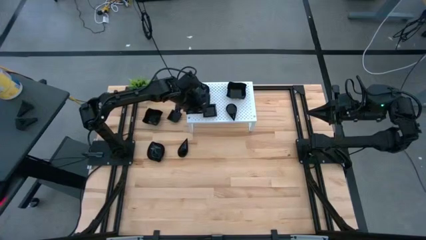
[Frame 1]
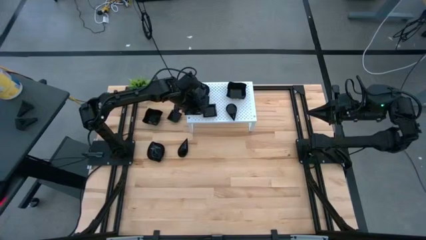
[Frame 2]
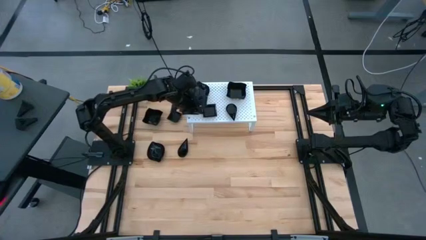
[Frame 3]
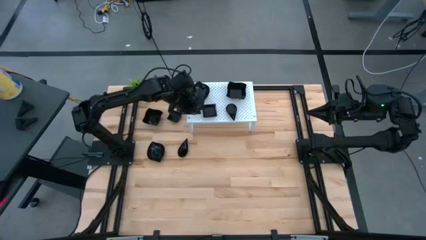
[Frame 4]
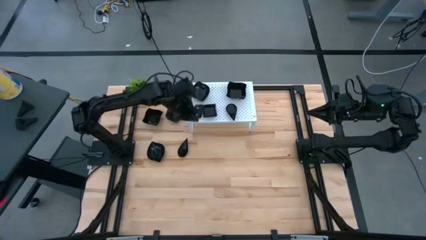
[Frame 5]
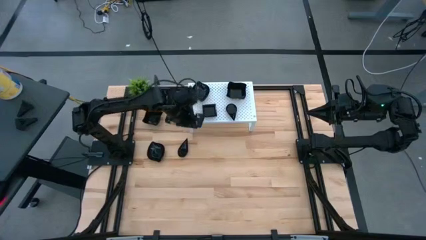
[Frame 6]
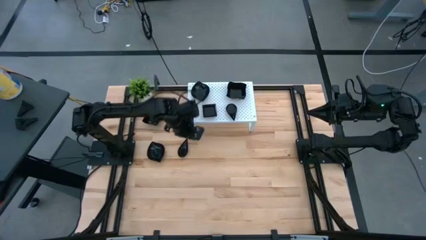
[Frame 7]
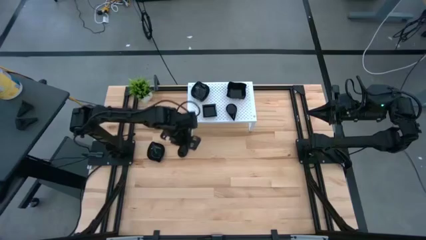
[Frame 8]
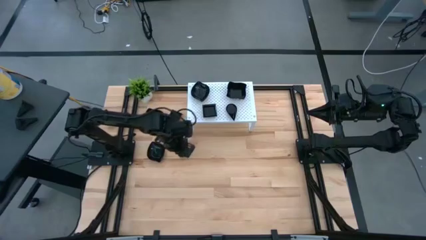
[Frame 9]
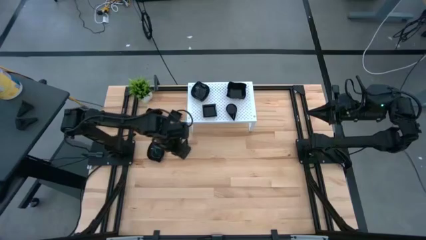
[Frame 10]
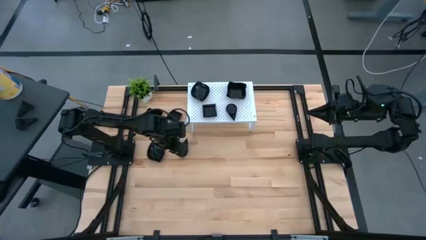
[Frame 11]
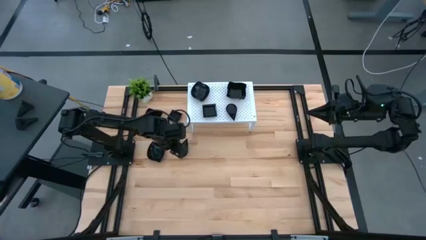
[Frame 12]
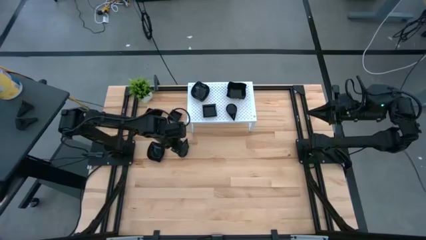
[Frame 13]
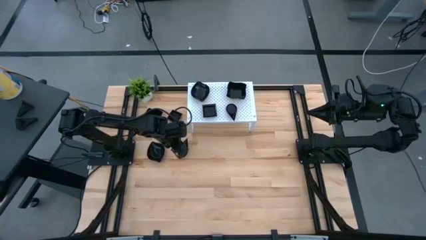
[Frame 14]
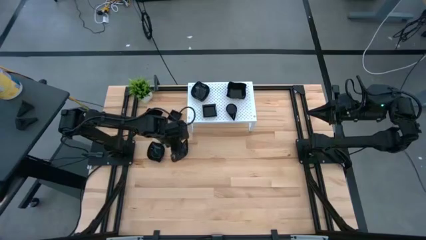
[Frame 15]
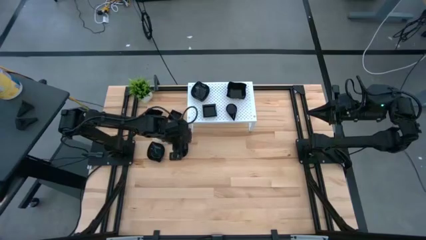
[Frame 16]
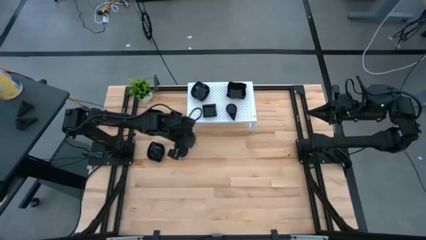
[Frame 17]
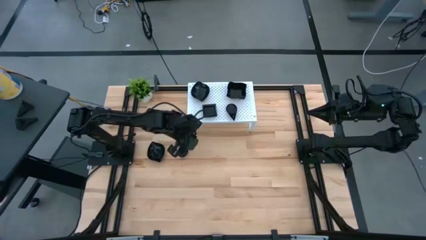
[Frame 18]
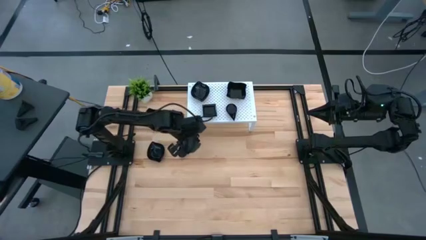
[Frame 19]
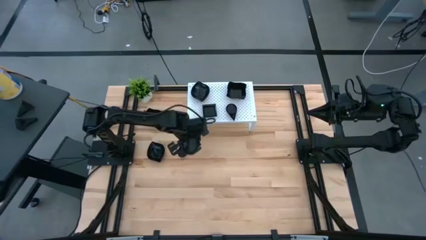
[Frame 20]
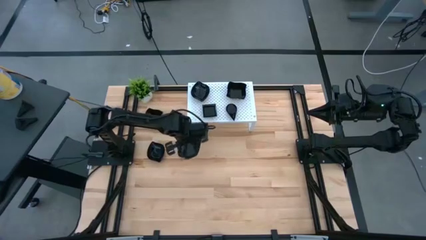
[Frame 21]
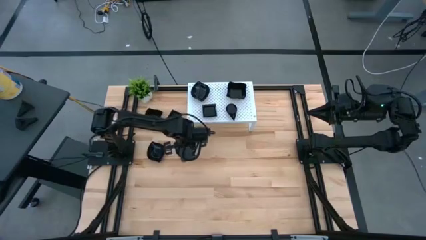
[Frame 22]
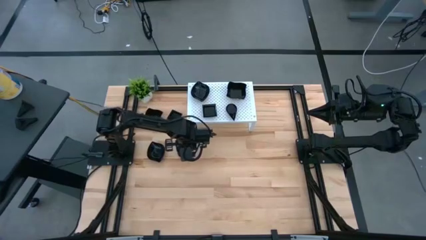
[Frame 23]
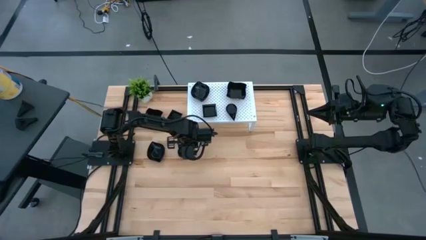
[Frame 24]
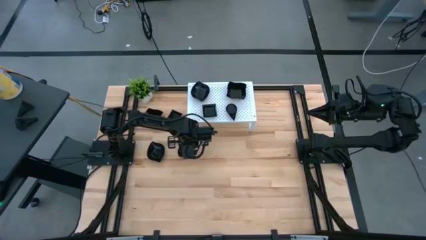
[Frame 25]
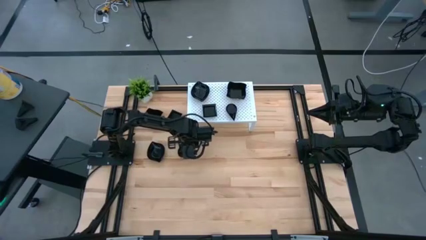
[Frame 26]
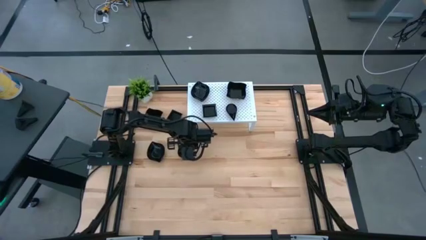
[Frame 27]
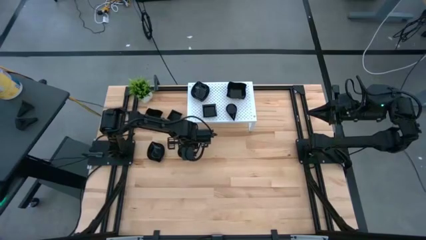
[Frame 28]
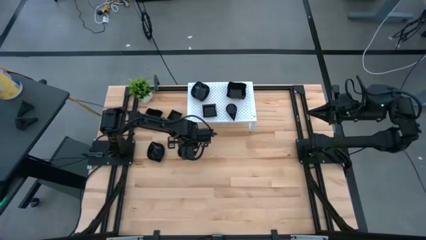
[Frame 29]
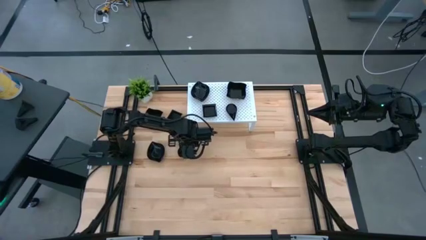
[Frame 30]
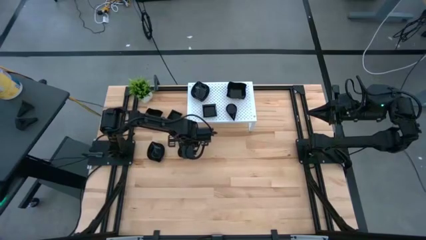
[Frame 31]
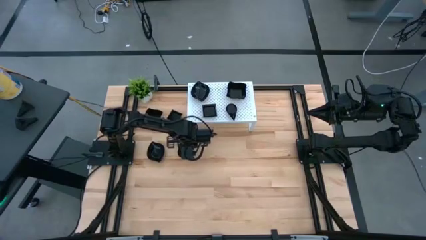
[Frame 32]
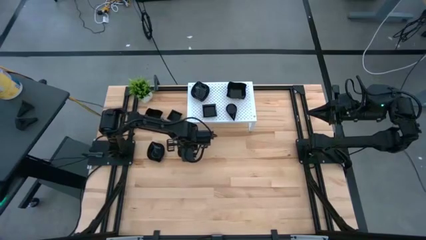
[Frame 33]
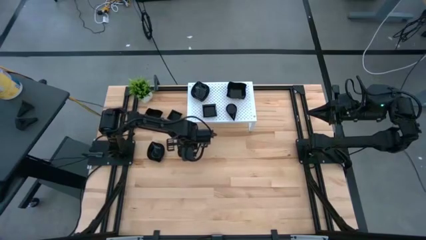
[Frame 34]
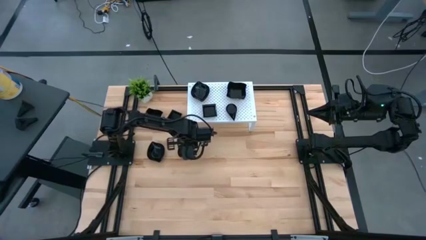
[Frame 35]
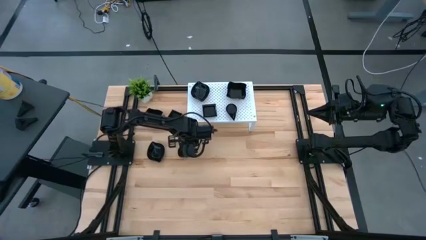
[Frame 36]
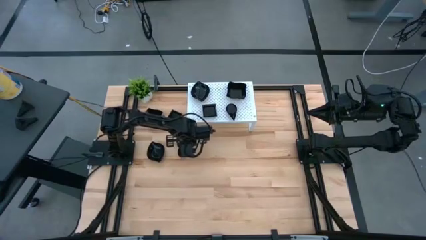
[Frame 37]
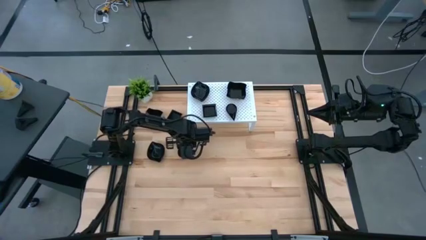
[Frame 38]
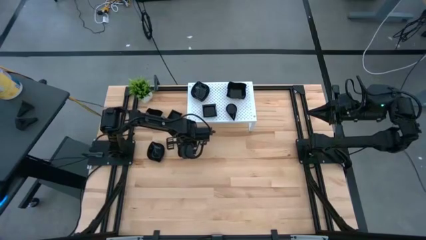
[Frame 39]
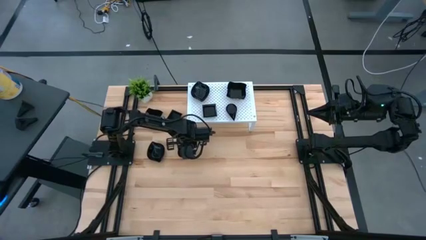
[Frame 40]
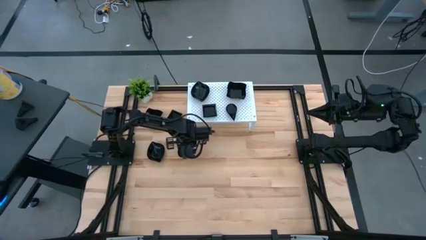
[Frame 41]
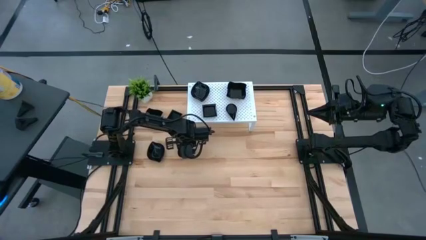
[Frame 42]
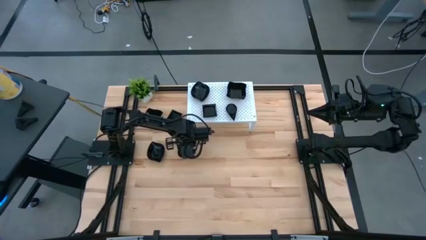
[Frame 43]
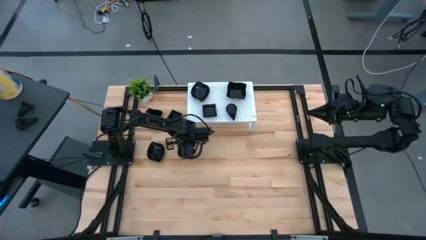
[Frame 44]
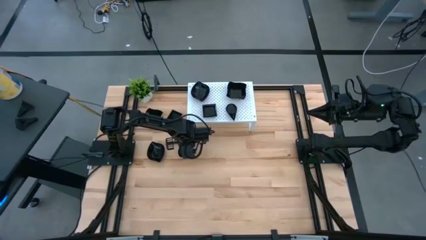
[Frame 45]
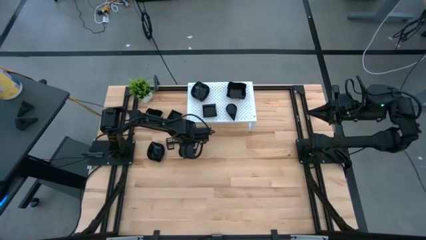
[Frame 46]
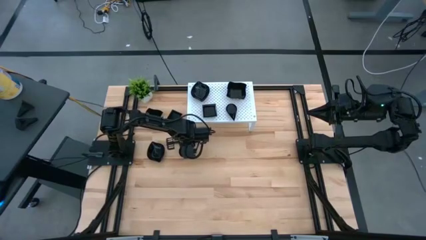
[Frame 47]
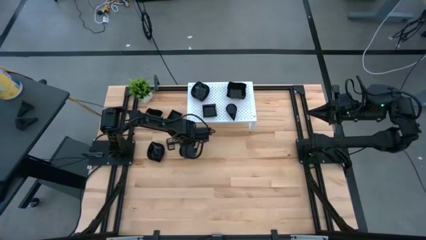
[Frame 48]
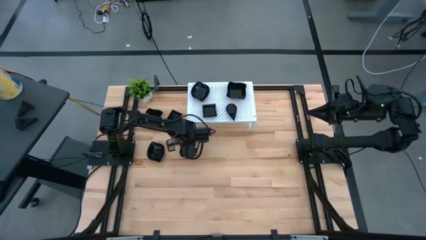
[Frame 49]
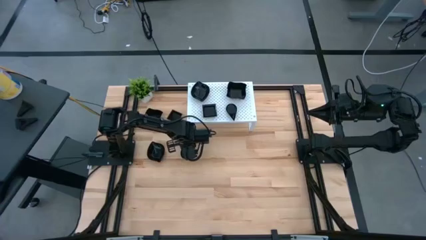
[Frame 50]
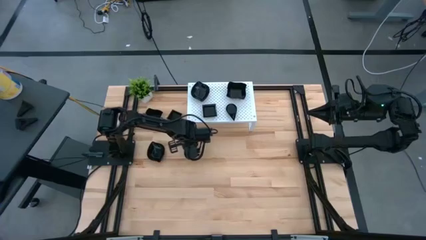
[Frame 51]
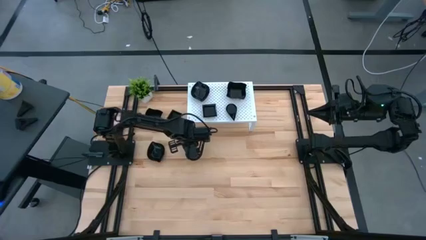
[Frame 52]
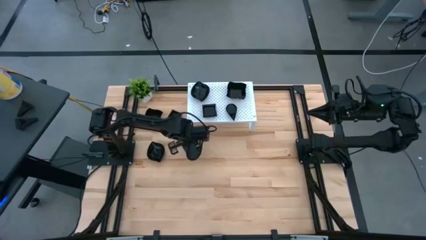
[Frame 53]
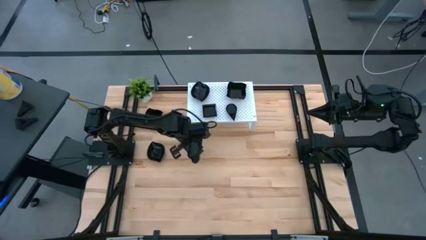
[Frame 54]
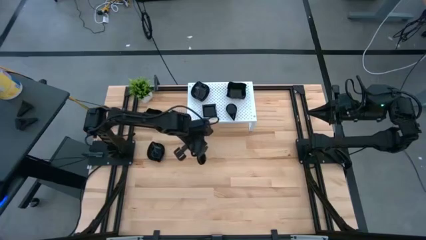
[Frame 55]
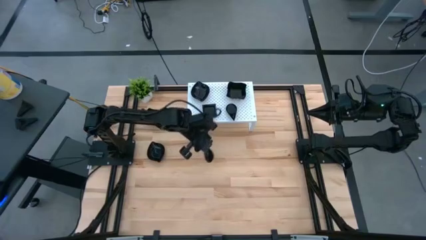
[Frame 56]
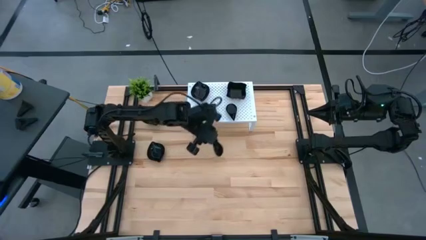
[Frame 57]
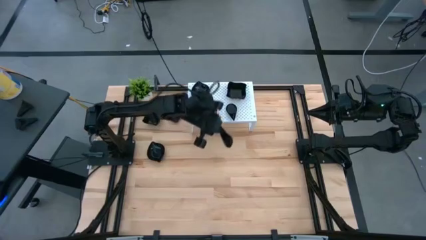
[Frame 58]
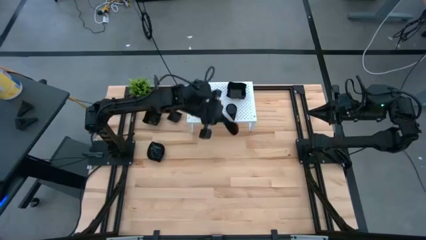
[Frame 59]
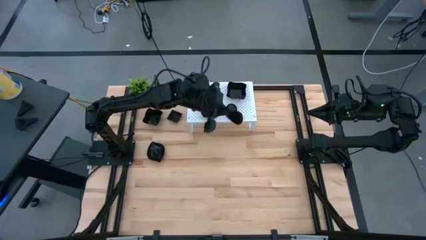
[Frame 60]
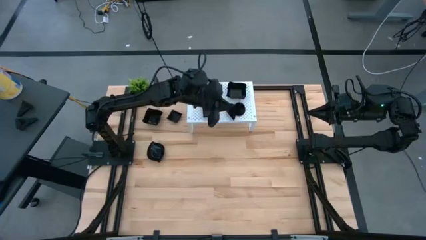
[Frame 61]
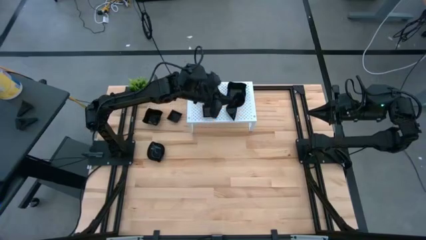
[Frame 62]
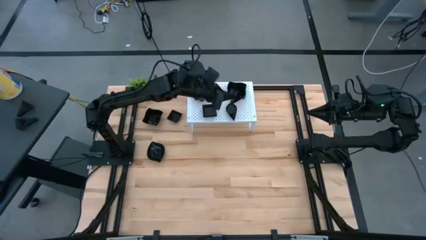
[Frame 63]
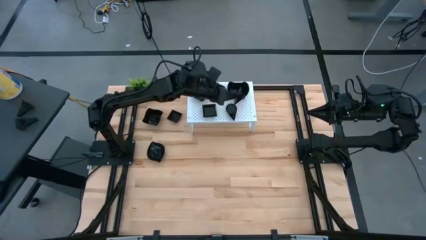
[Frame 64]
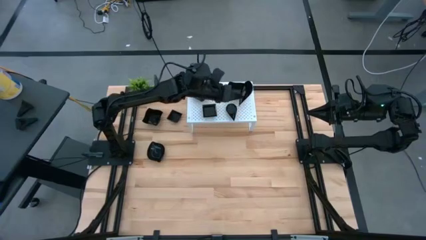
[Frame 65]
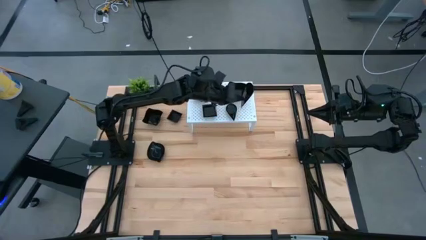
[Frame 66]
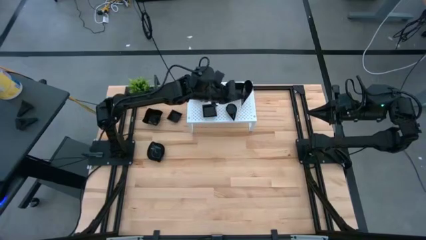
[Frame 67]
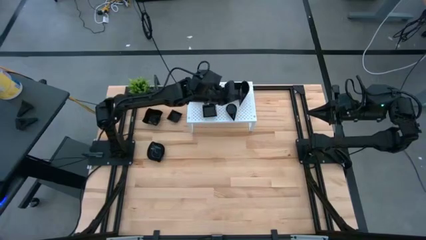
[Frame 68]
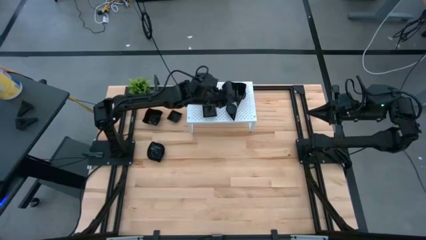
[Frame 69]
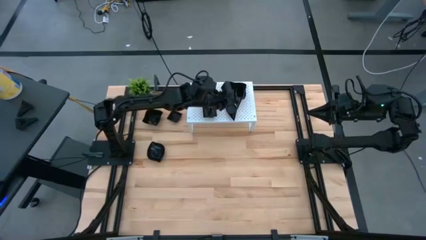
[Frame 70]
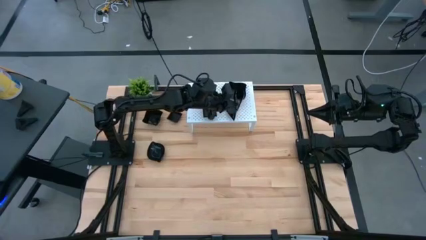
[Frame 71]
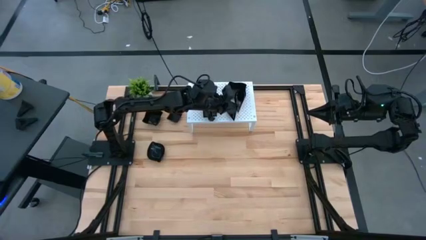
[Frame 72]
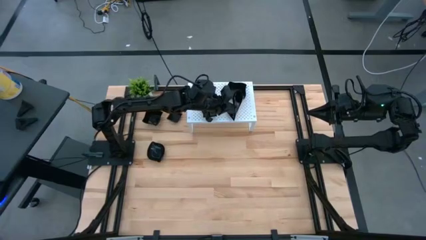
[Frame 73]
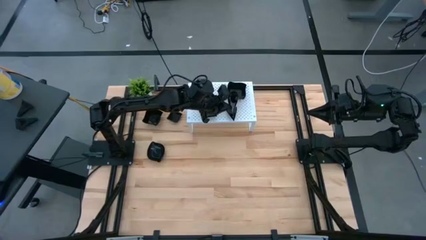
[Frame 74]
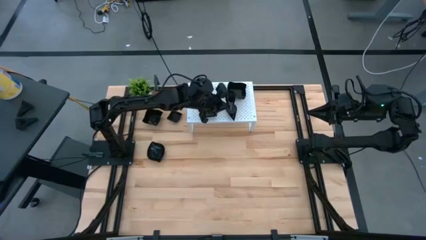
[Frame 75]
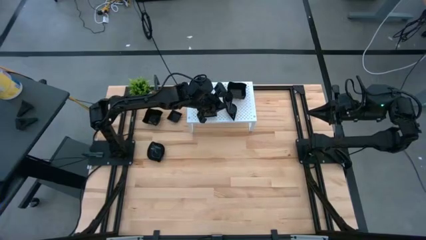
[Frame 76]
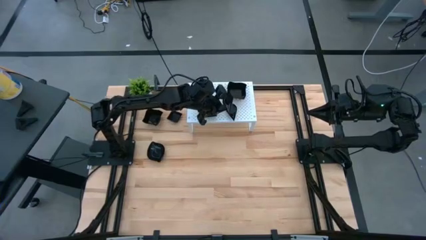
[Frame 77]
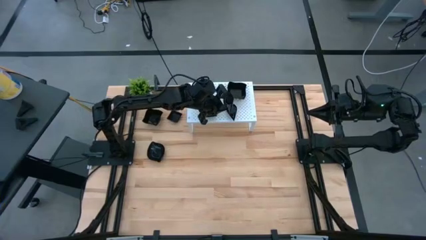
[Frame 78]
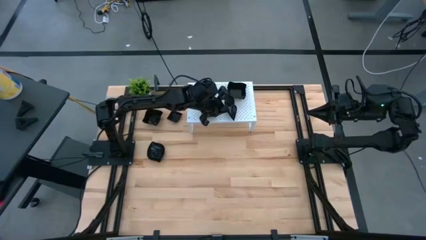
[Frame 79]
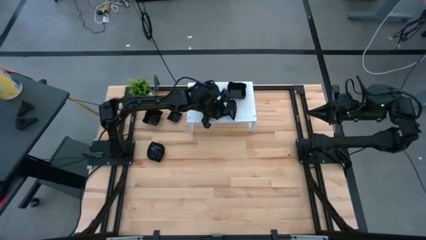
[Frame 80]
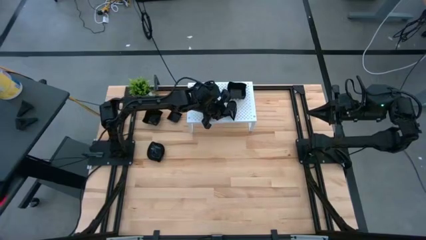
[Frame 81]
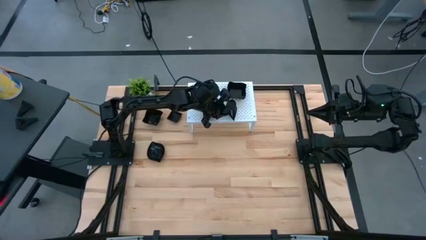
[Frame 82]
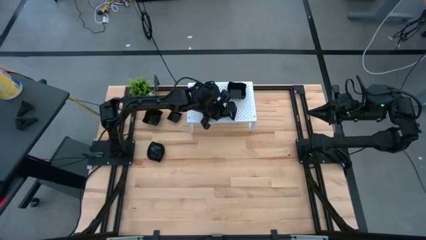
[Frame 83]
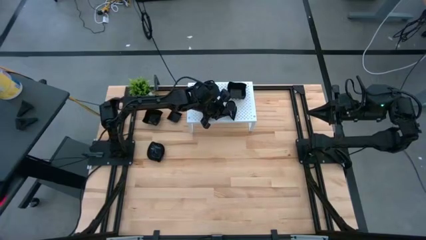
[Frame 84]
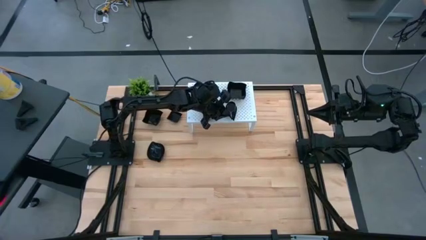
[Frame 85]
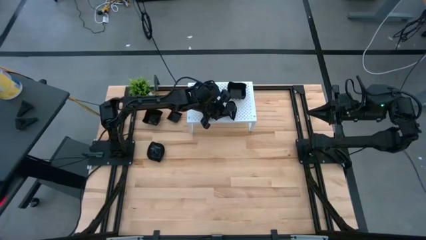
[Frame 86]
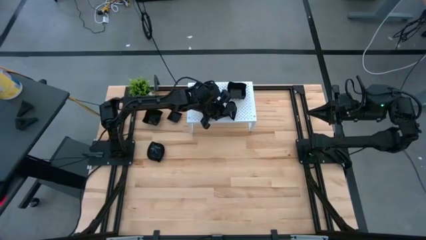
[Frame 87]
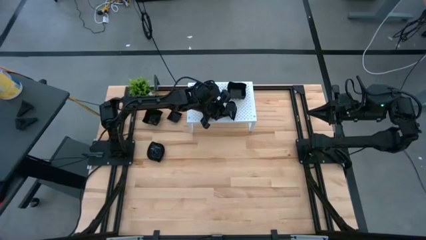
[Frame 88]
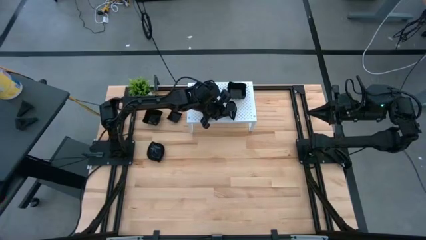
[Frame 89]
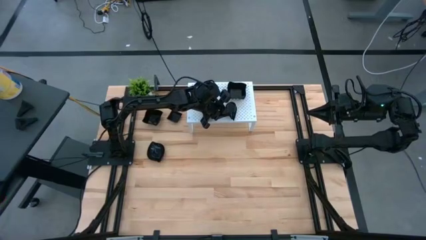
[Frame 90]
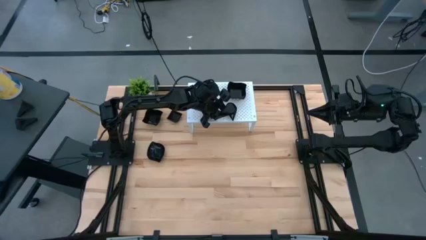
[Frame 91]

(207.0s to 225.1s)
Task: Pick & Place Mini shaped plates
Stack the drop-shaped plate on top of the drop-shaped plate on the shelf
